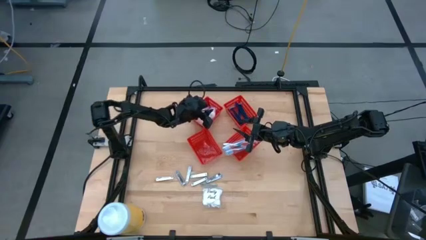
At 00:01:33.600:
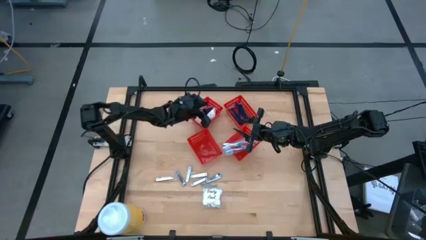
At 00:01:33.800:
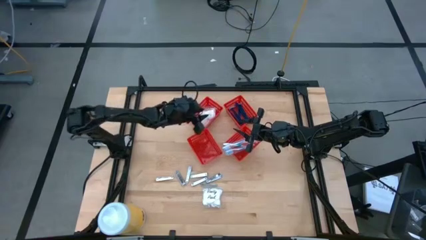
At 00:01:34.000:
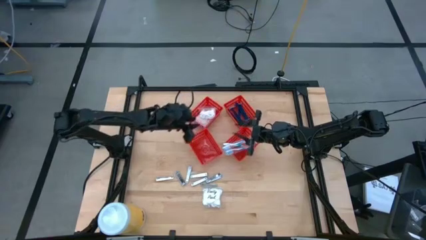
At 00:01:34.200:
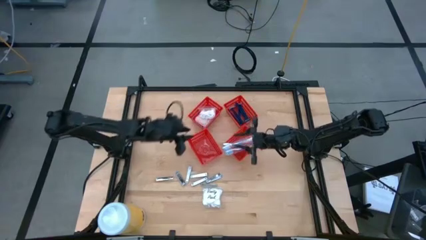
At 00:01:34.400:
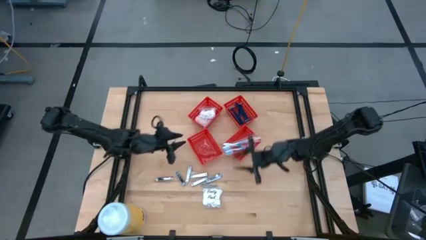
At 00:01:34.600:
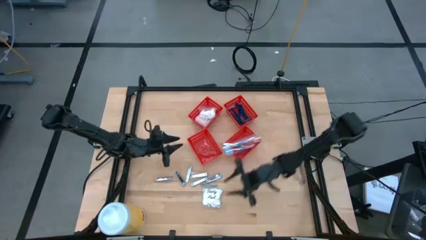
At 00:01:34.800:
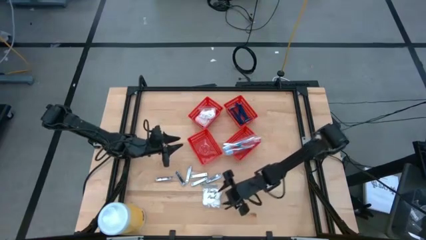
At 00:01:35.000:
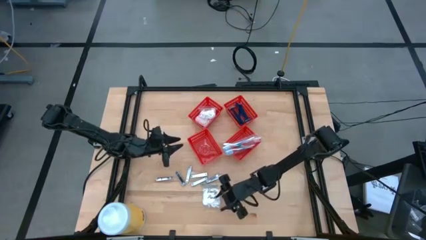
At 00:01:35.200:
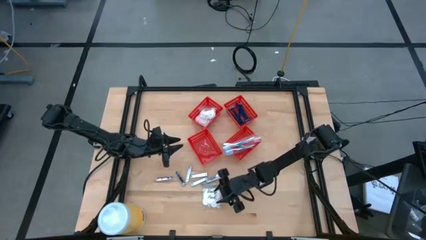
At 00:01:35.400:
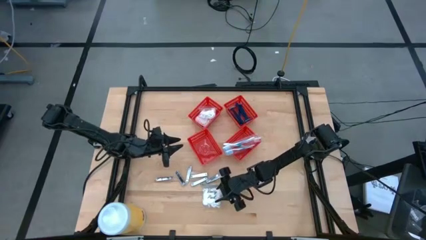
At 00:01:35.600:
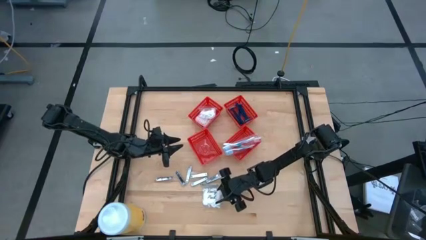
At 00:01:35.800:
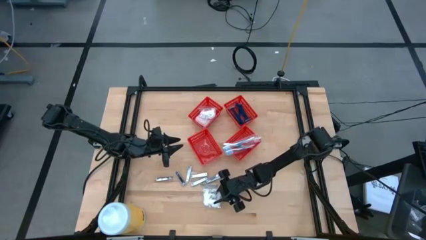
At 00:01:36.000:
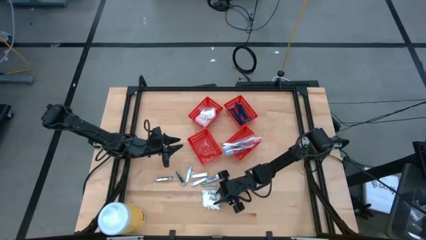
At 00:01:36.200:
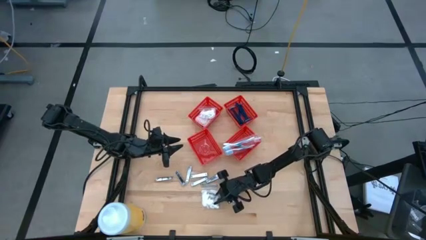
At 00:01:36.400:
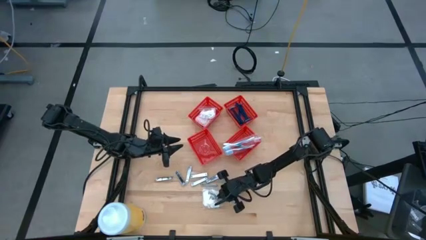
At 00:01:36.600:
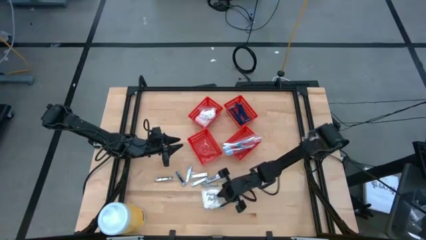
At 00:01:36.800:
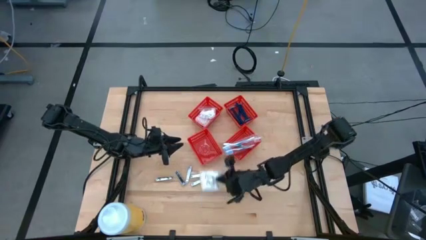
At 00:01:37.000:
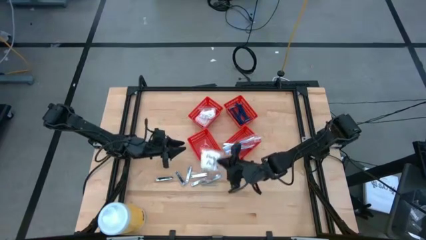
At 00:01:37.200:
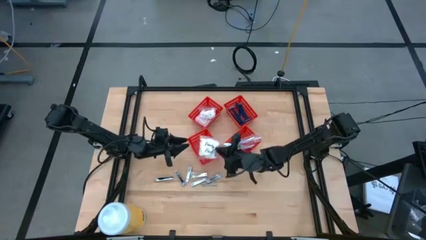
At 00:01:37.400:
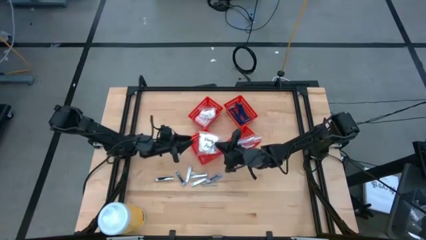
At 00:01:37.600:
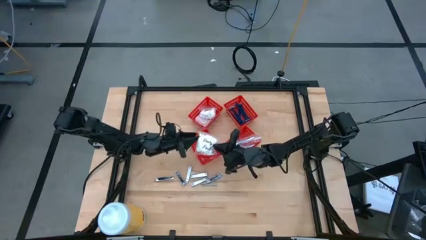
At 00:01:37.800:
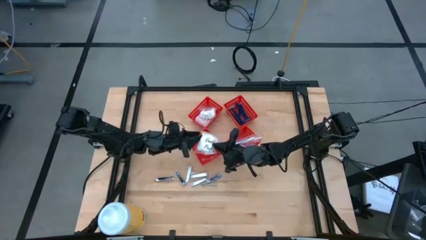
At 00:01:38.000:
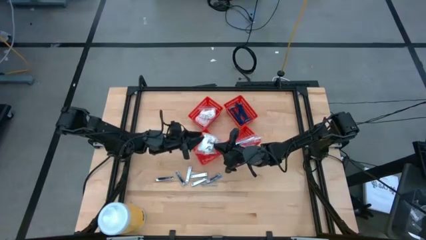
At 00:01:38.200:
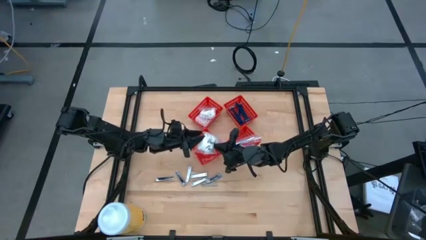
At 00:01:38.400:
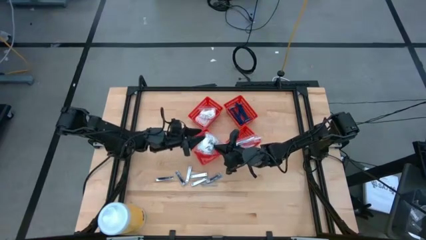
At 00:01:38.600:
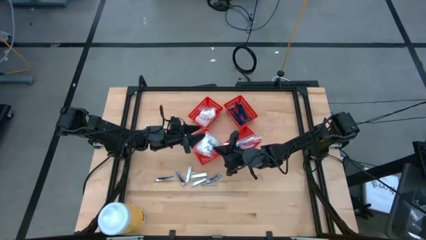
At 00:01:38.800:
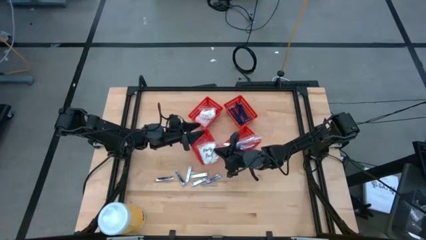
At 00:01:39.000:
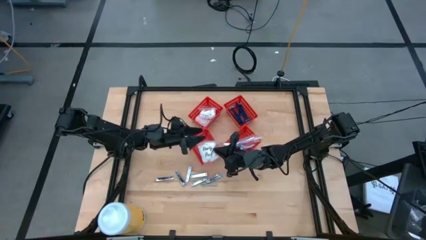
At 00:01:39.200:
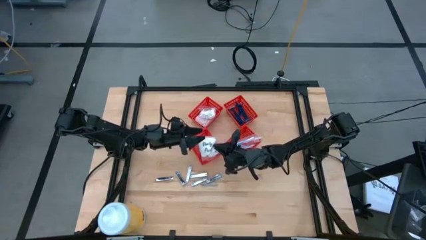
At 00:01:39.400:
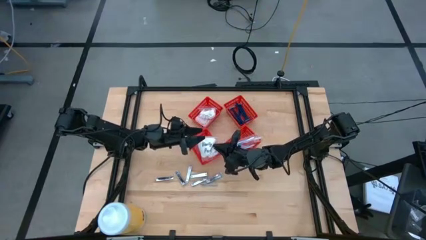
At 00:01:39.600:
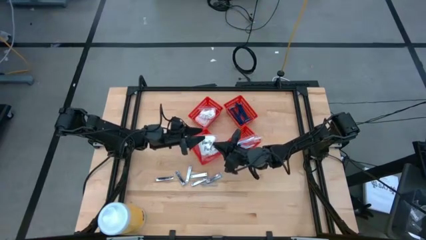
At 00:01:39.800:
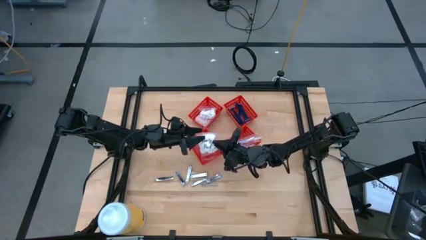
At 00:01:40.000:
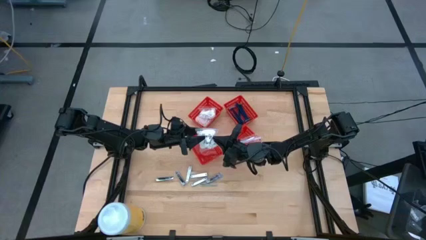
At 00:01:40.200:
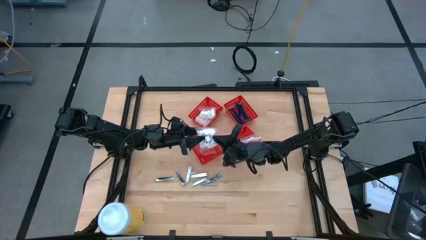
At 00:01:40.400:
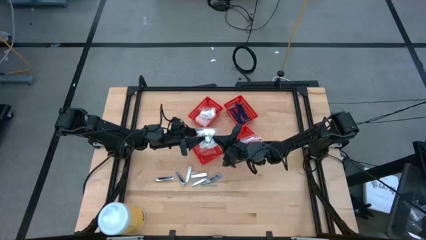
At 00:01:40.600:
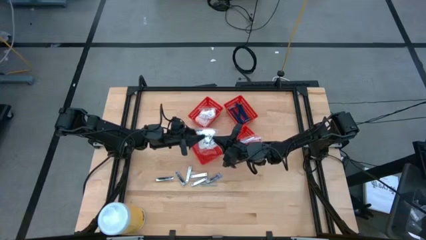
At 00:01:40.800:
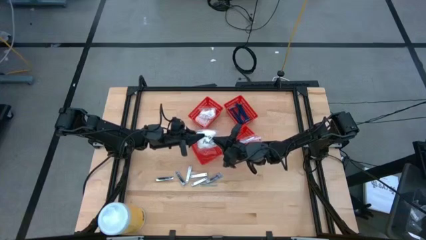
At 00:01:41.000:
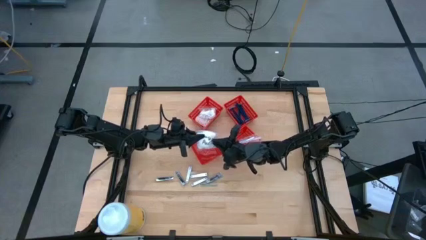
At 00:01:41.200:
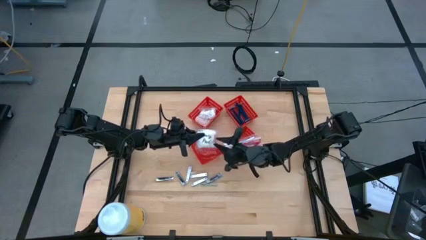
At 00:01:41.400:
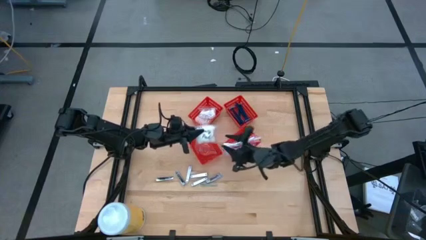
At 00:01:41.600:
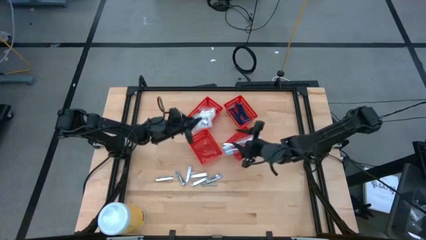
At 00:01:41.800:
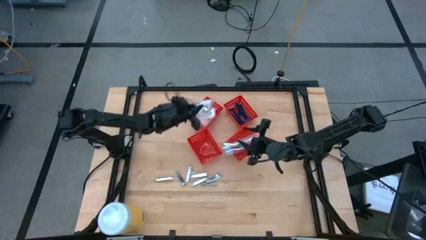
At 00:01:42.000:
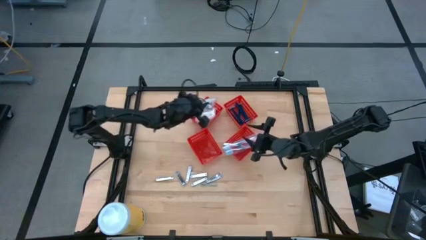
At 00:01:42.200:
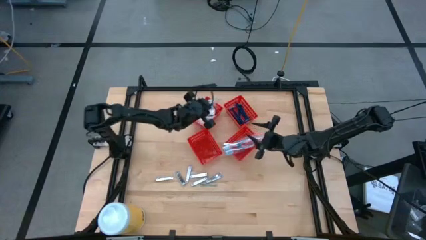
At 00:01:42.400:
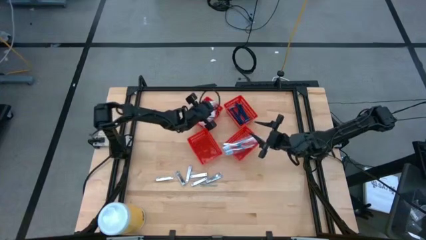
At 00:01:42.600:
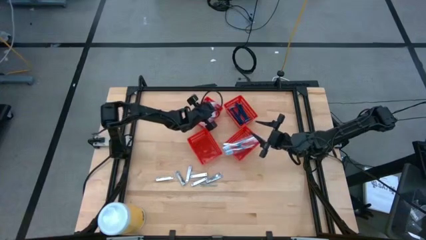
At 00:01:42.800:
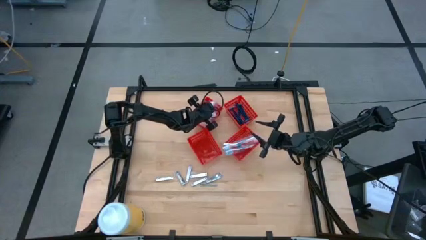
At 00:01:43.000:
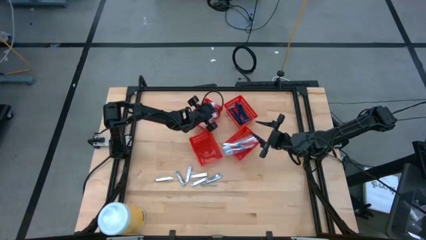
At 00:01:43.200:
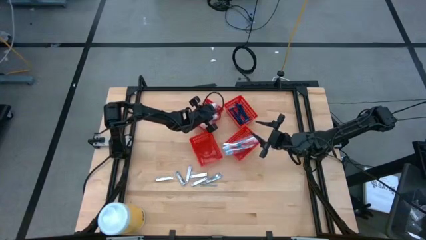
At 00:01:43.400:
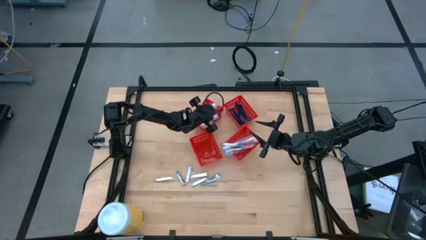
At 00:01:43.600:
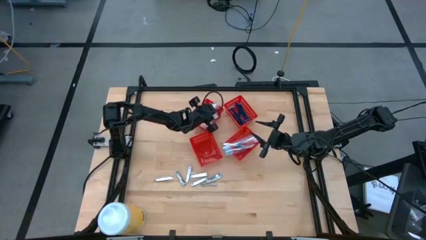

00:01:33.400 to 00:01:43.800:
Task: Pick & Place Travel size toiletries
Put the transparent cotton pack into the top left red bin

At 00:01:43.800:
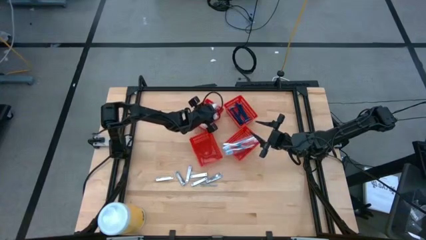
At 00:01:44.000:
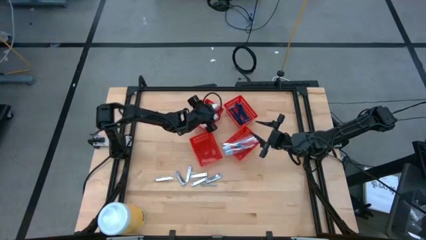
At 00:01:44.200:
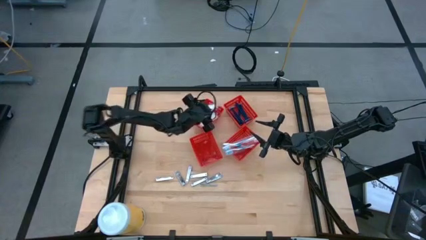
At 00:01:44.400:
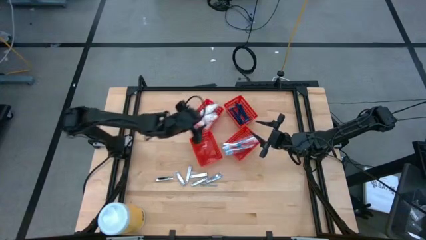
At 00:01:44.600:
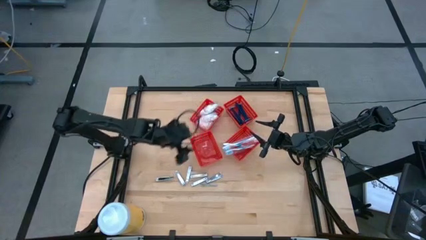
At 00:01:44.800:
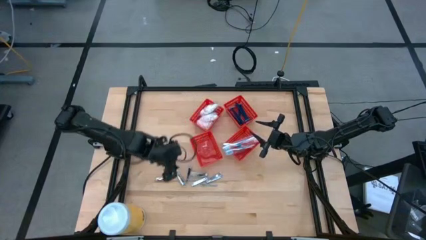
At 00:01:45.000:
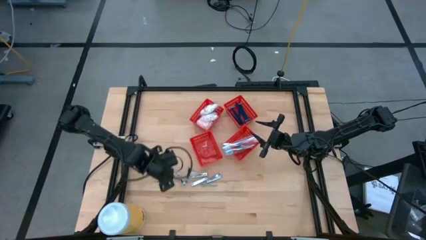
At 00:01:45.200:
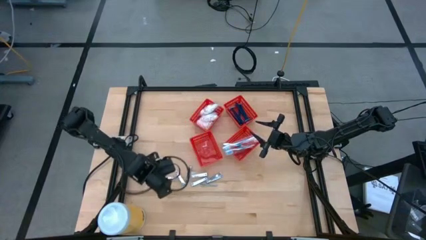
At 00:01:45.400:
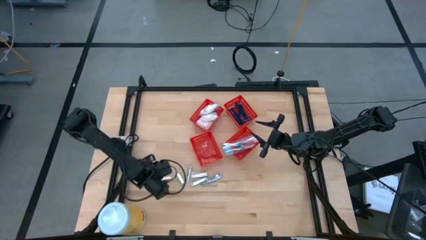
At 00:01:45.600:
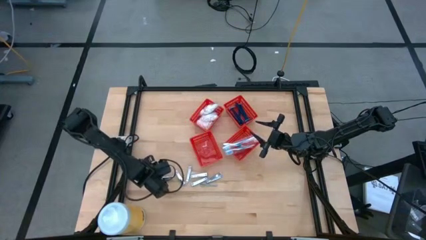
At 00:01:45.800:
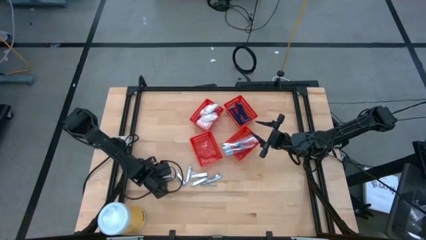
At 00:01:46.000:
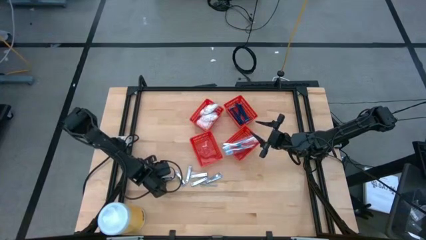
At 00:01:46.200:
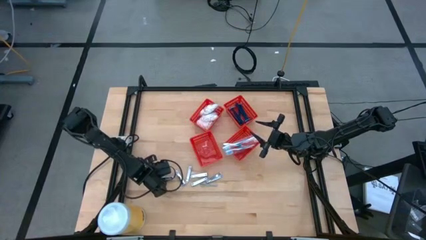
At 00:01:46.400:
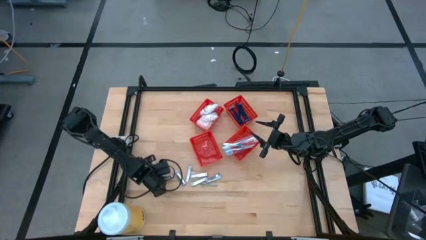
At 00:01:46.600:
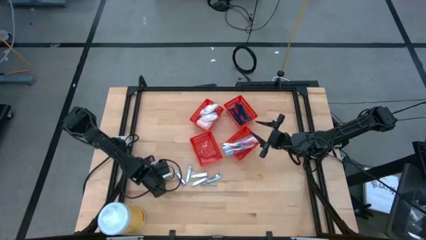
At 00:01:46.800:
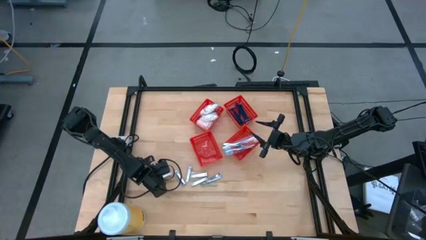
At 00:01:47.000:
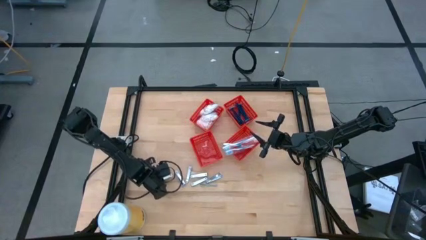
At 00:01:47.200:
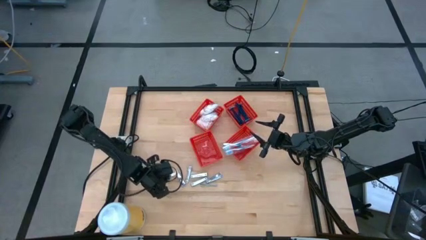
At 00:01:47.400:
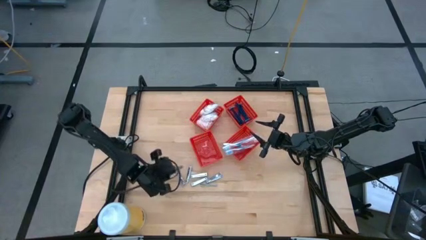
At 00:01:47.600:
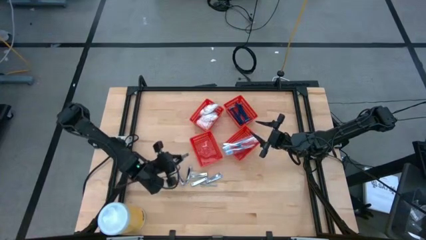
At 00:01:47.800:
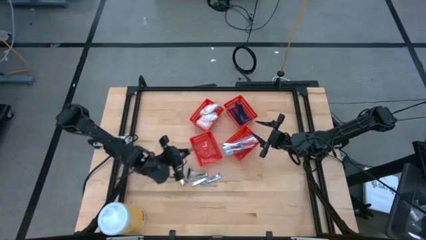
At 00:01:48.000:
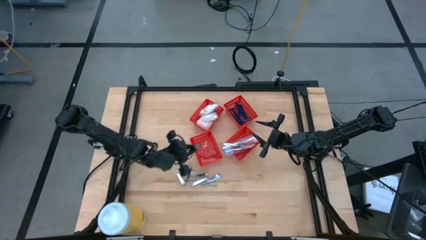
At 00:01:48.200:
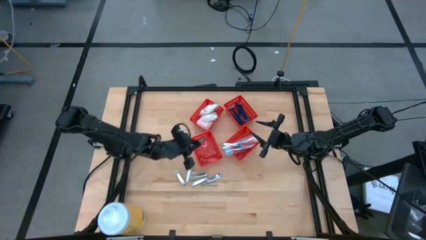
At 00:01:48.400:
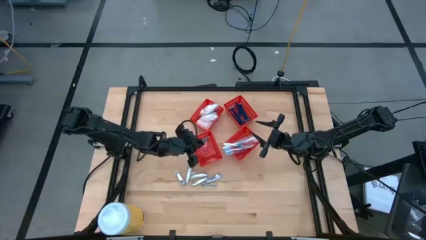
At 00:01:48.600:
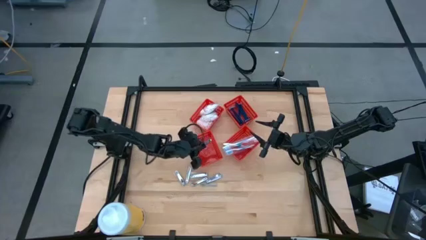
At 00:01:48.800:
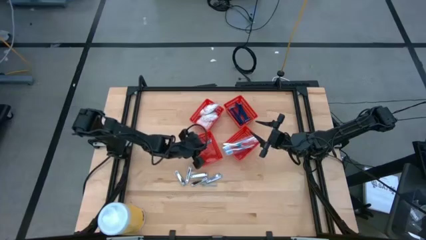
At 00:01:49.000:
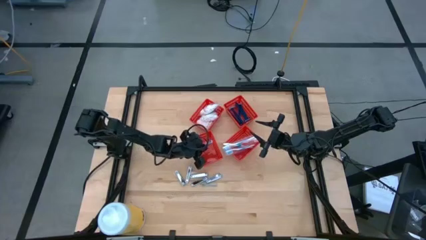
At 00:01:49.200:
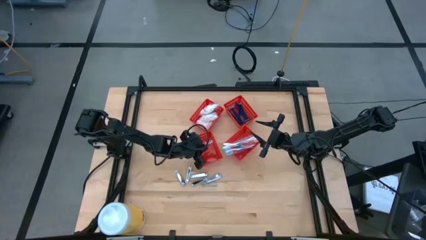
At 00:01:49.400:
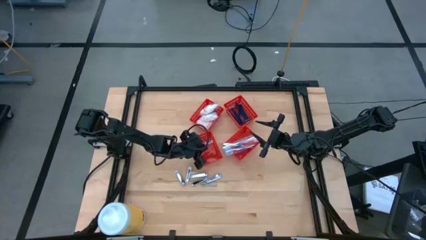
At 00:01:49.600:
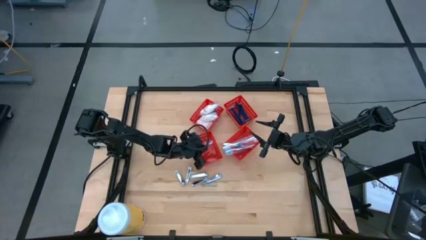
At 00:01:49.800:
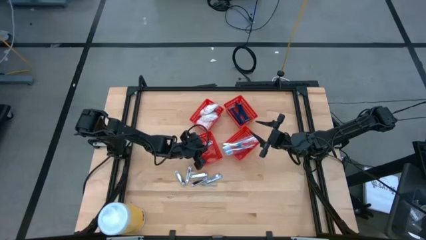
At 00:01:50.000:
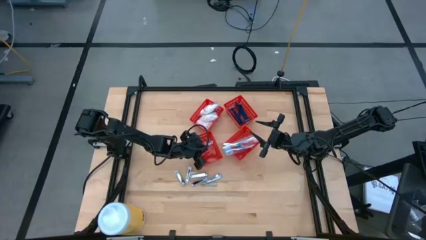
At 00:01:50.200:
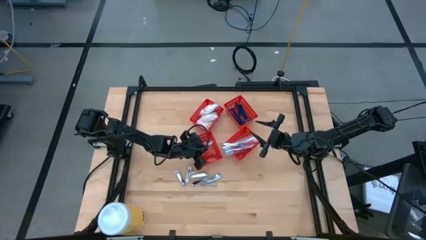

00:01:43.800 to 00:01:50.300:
Put the silver nail cutter into the bottom left red bin
